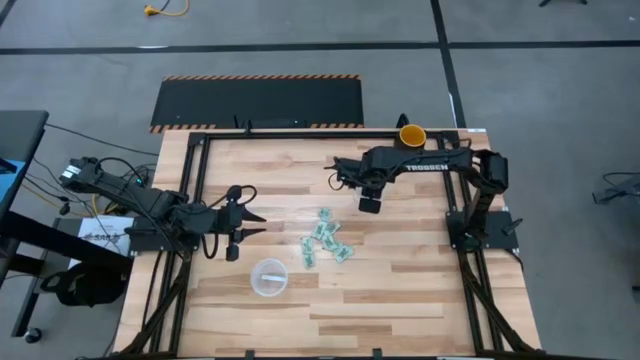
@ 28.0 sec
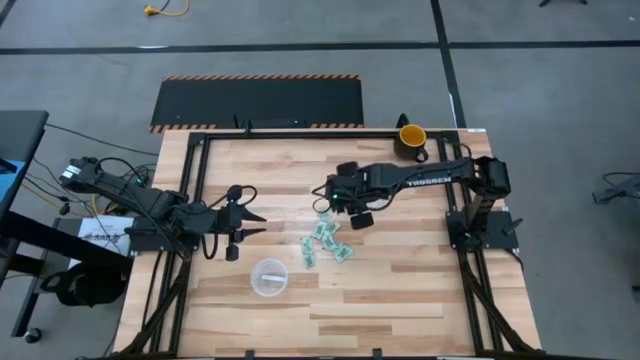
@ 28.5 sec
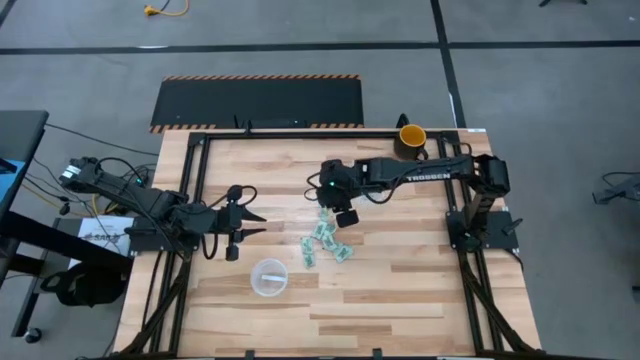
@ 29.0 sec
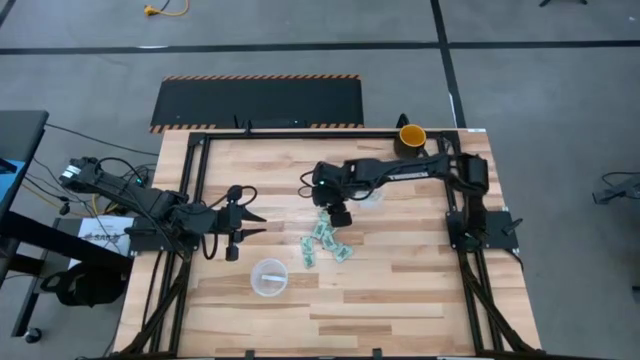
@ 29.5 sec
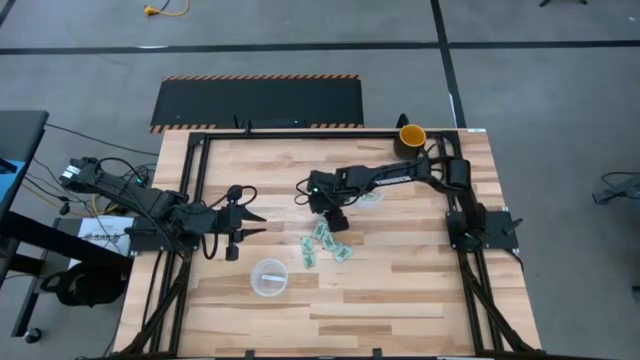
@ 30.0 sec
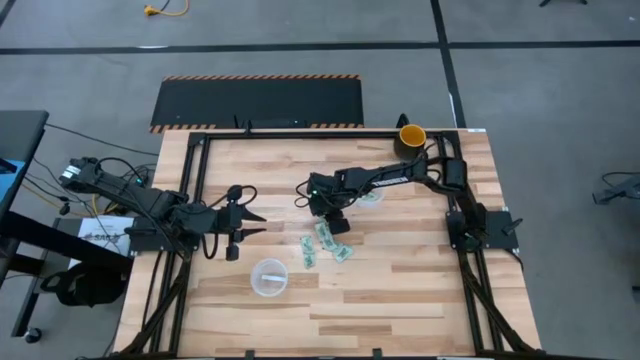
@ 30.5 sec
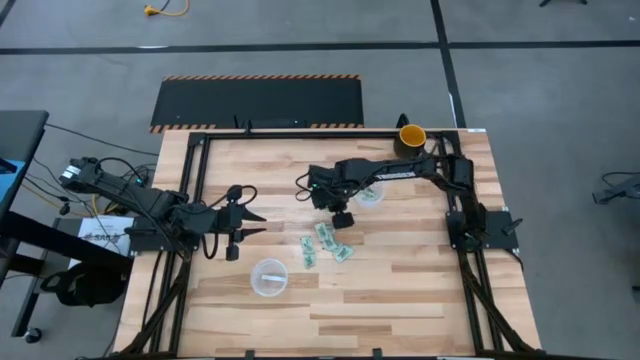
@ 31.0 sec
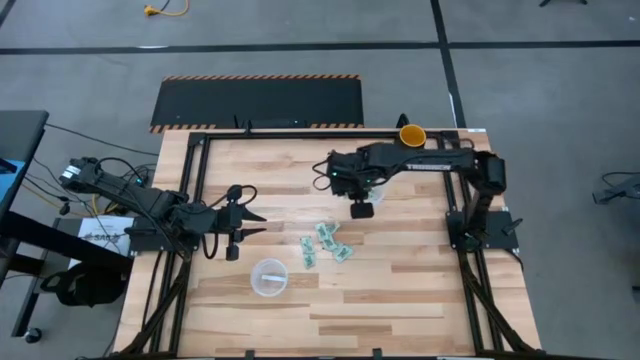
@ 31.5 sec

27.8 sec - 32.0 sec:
Task: Pick and place Stevia / Truvia into bins
Put the stevia packet into the top transparent container

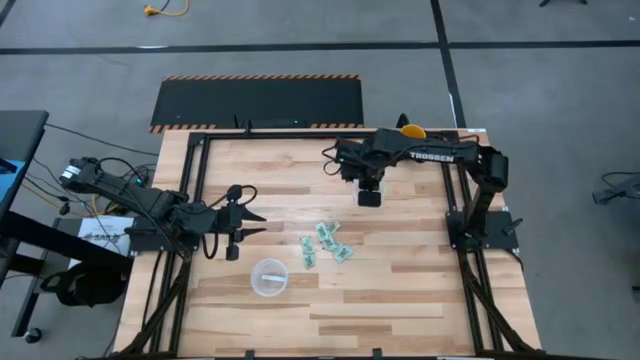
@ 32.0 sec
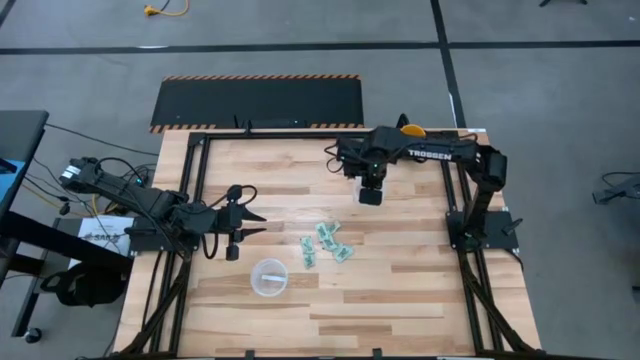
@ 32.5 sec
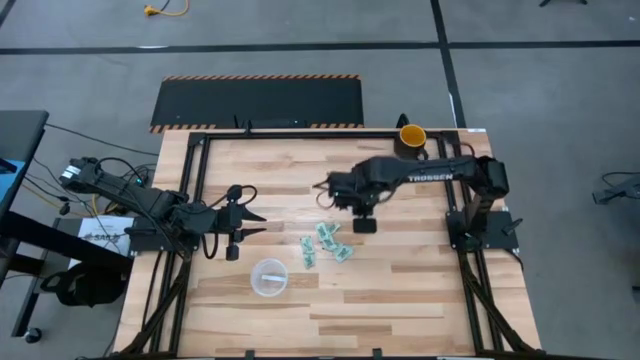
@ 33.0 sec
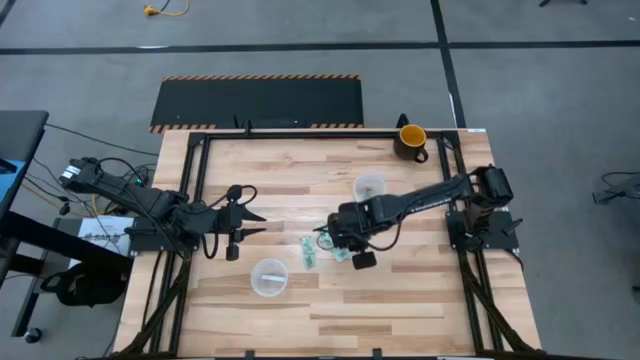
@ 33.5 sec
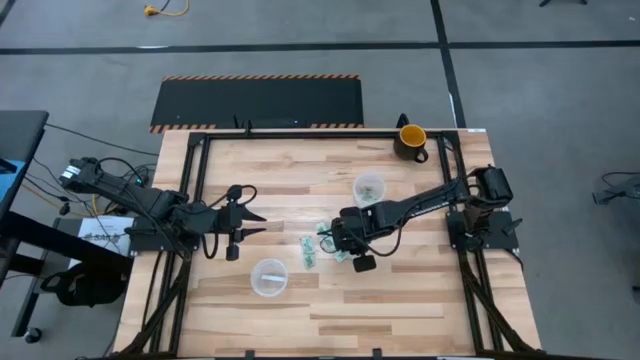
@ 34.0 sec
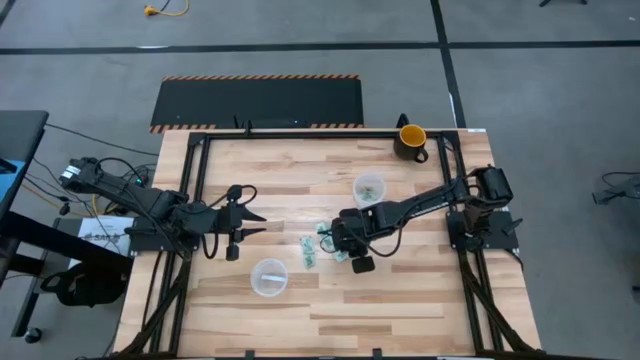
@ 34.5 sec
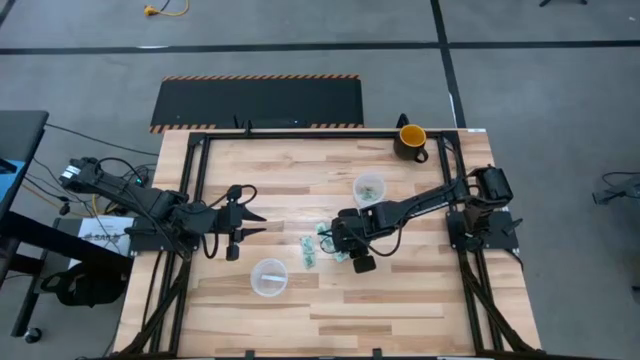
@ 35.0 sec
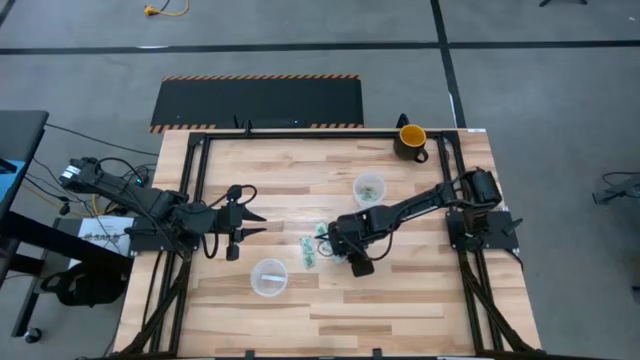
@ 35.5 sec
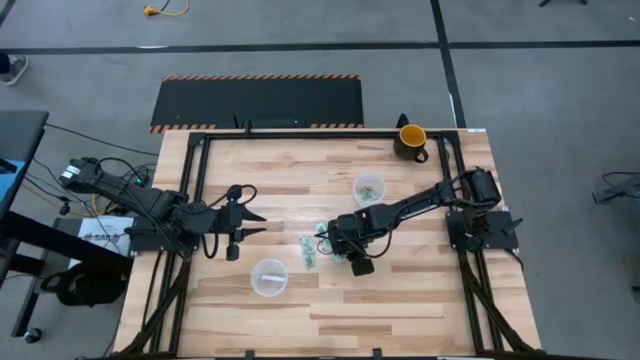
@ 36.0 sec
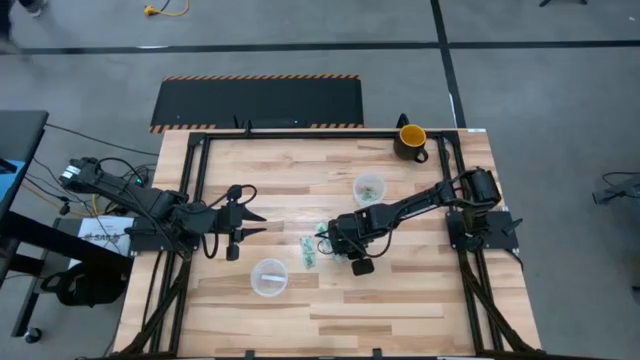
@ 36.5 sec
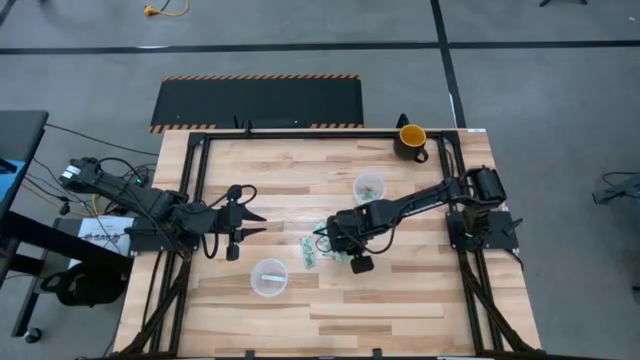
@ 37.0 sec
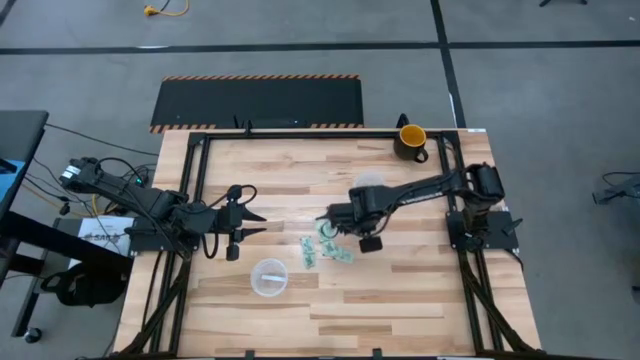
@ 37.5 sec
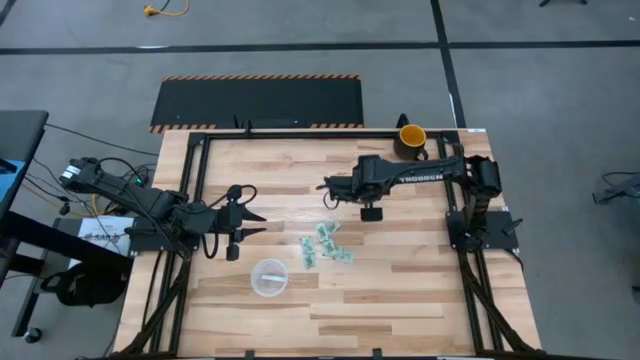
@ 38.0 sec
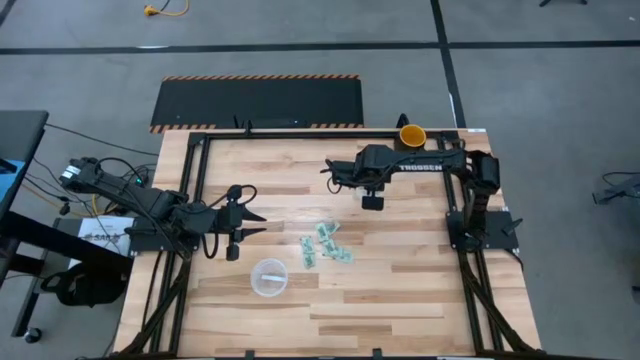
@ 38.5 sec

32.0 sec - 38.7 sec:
Put the stevia packet into the top transparent container

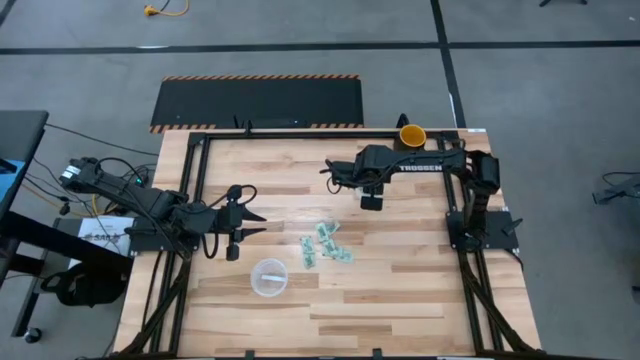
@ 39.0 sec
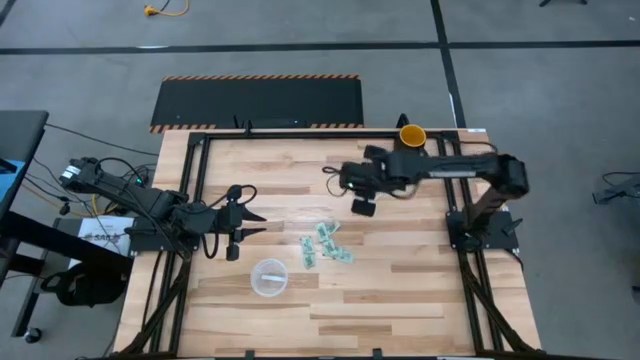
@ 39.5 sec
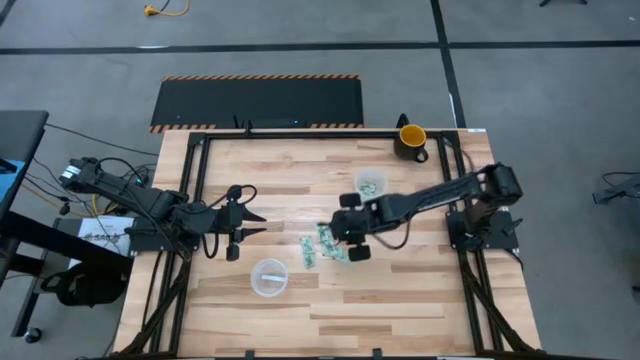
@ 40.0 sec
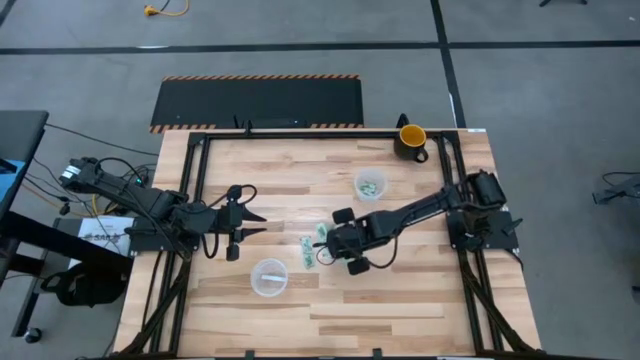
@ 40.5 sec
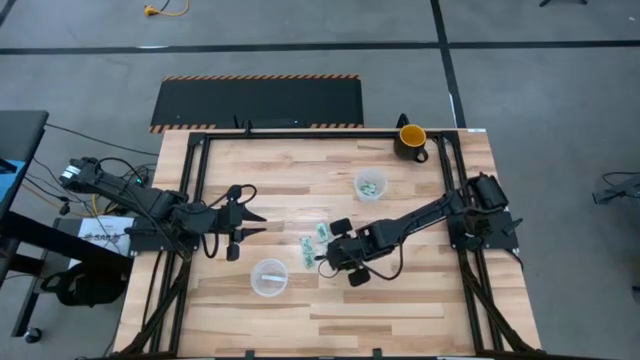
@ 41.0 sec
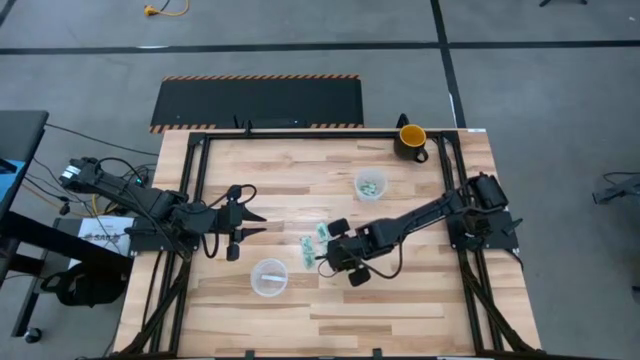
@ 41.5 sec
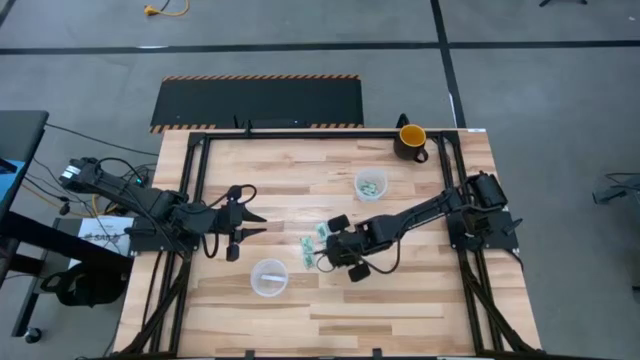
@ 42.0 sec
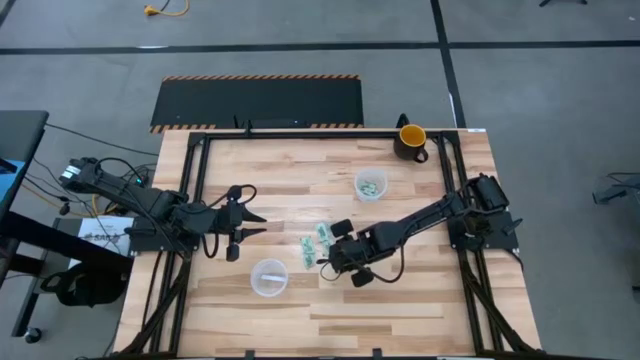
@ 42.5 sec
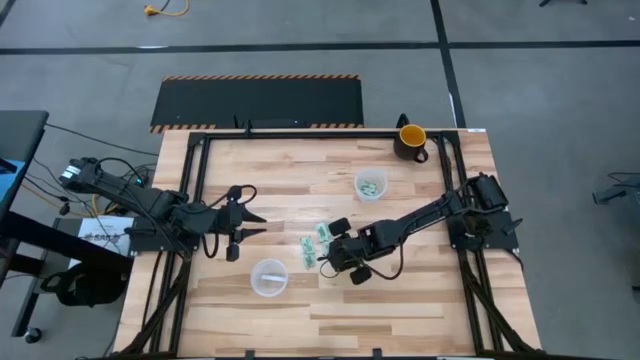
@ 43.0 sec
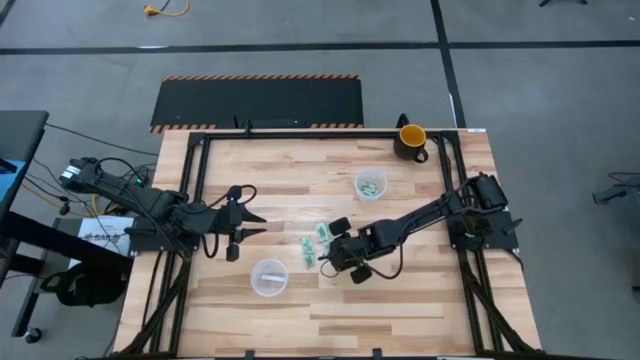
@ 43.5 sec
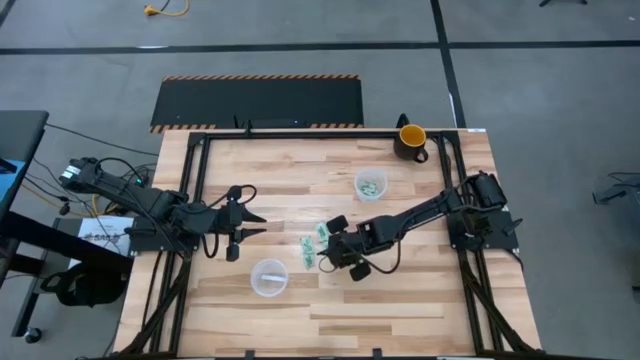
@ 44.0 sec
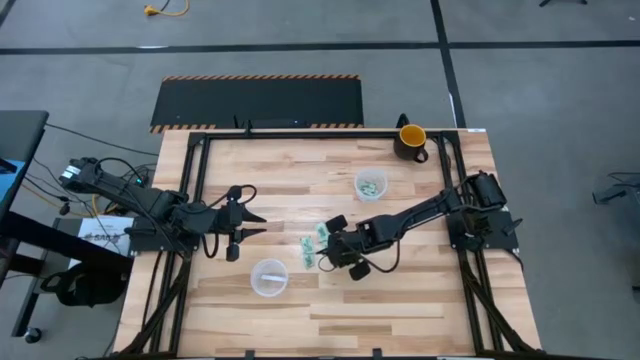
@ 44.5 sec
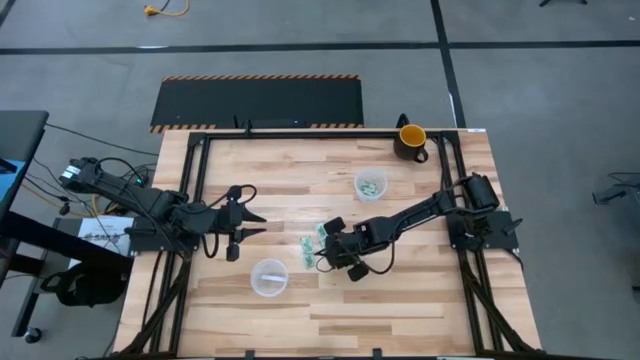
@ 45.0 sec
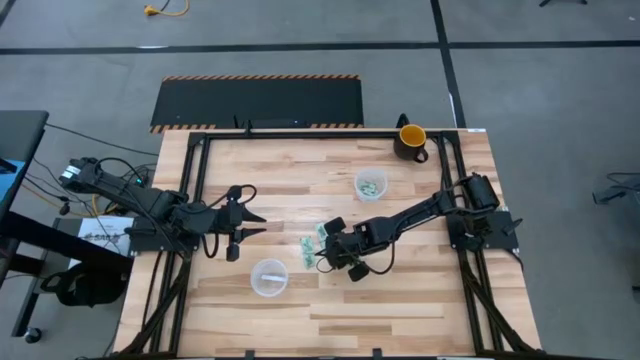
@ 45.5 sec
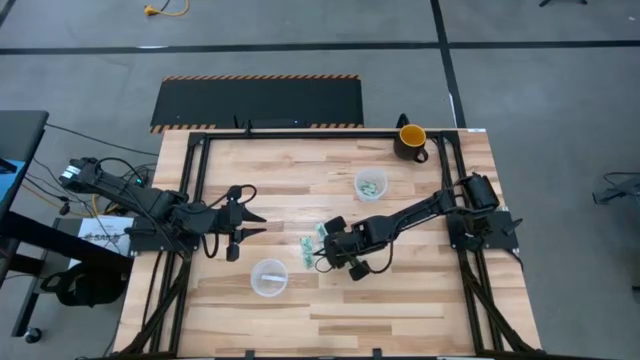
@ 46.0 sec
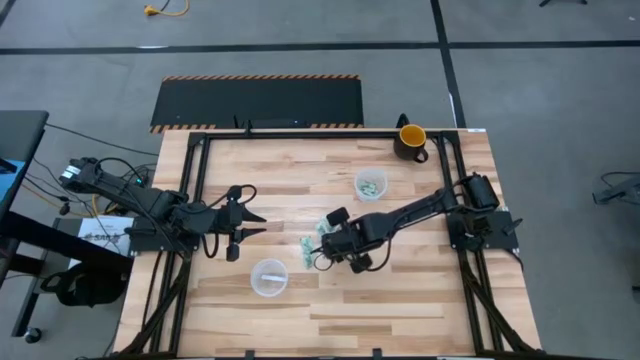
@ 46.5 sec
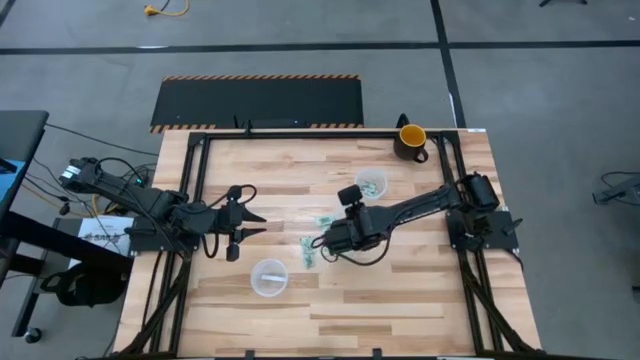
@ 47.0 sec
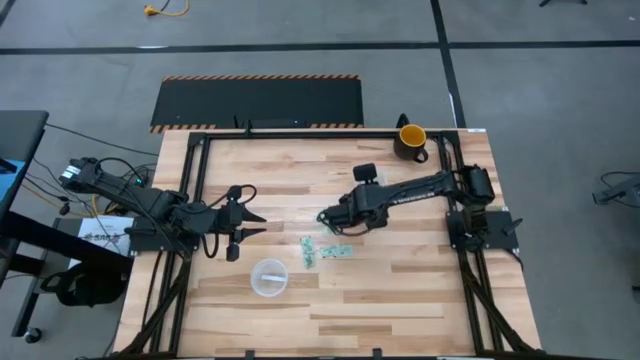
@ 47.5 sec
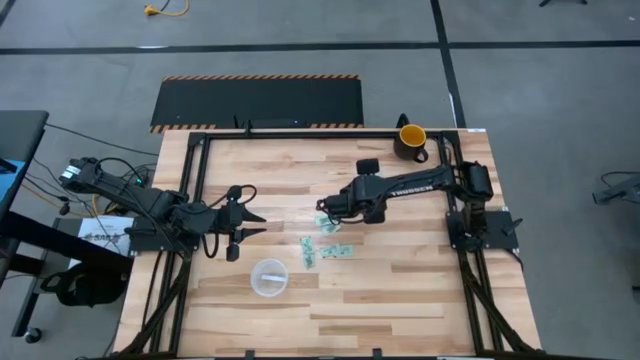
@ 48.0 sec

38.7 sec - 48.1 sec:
Put the stevia packet into the top transparent container
